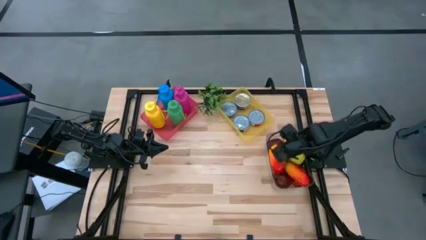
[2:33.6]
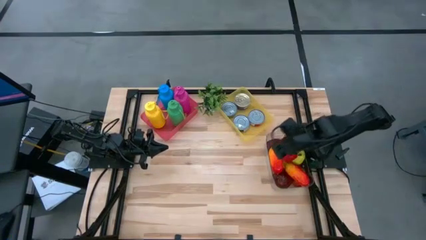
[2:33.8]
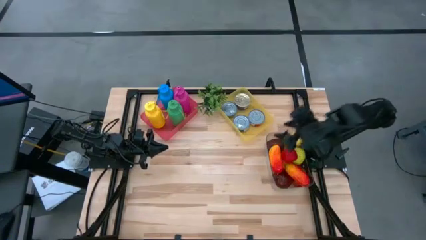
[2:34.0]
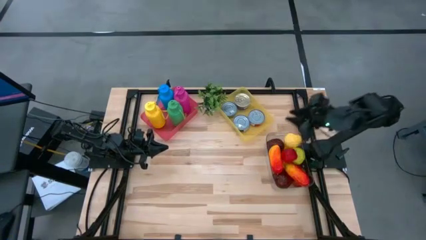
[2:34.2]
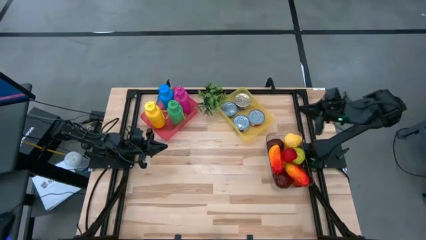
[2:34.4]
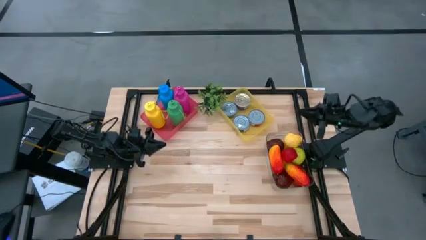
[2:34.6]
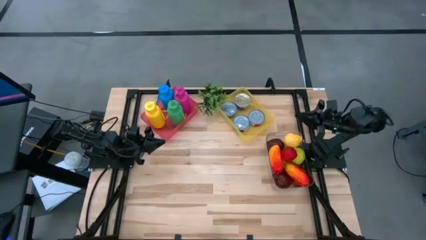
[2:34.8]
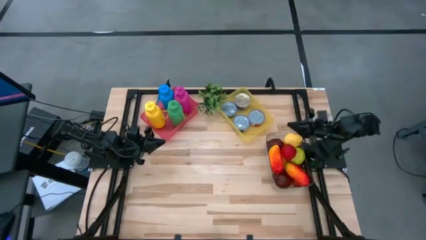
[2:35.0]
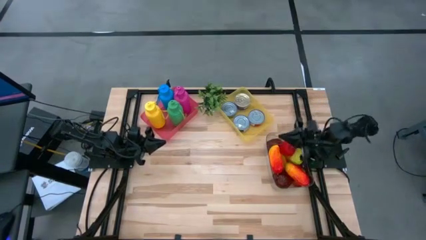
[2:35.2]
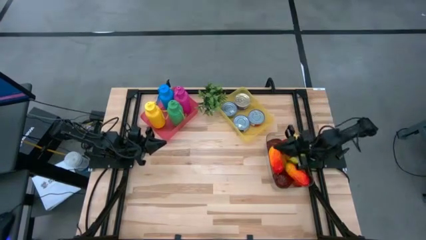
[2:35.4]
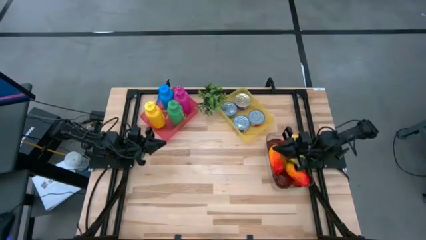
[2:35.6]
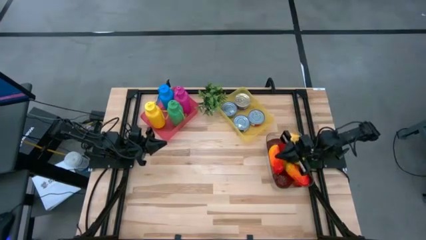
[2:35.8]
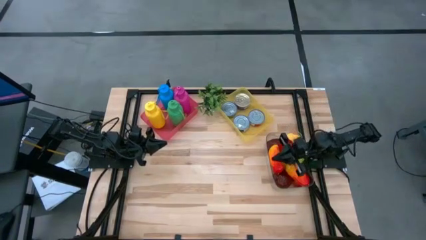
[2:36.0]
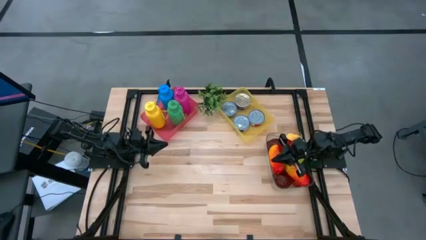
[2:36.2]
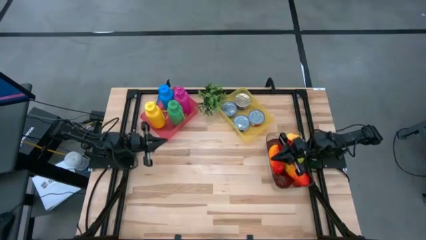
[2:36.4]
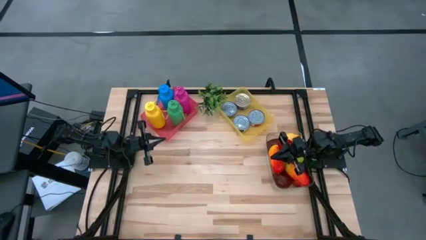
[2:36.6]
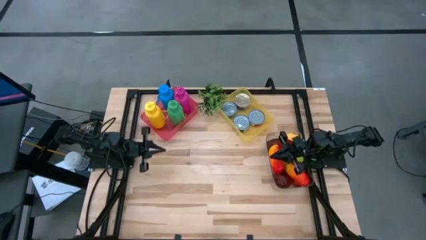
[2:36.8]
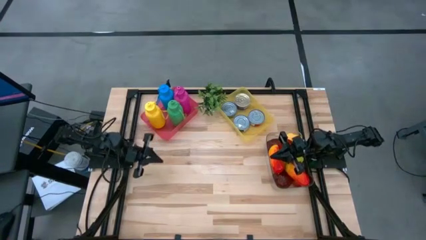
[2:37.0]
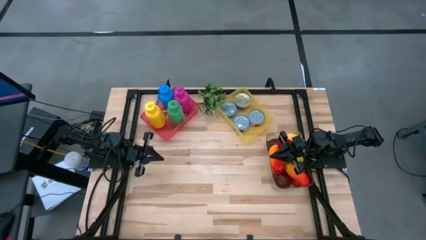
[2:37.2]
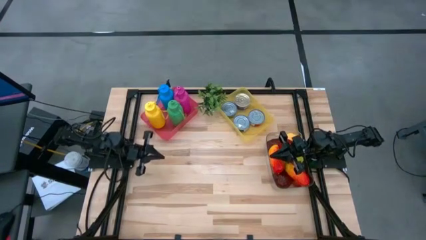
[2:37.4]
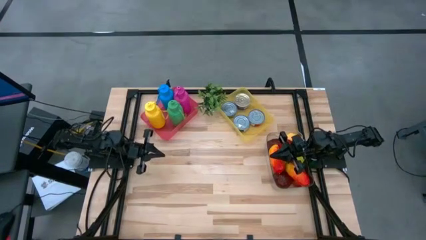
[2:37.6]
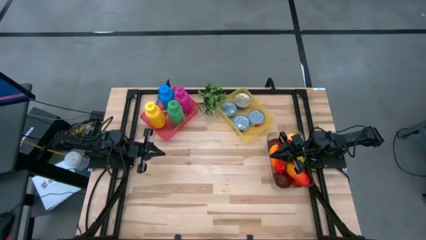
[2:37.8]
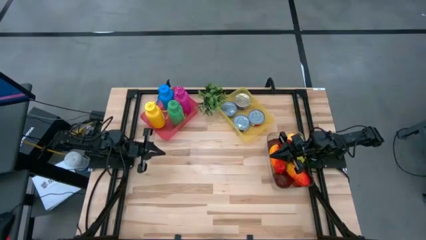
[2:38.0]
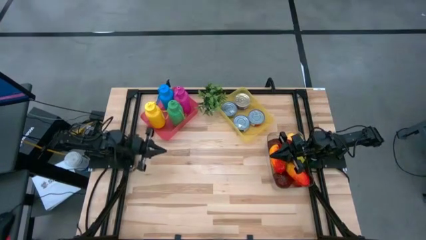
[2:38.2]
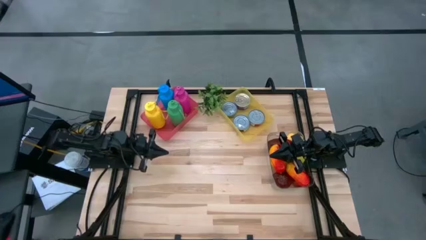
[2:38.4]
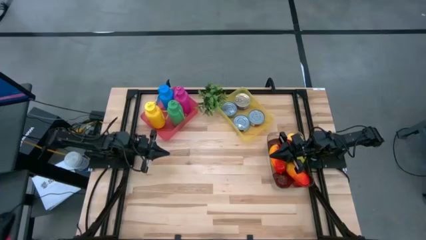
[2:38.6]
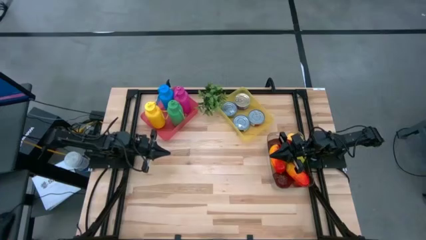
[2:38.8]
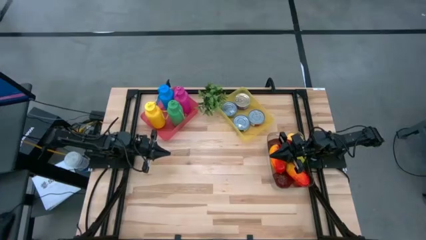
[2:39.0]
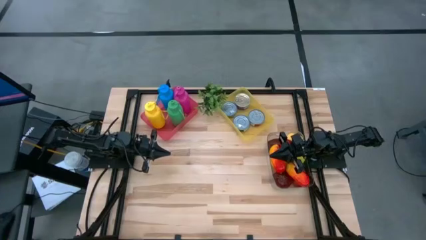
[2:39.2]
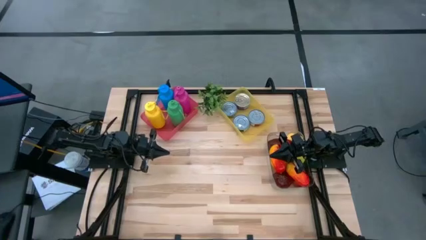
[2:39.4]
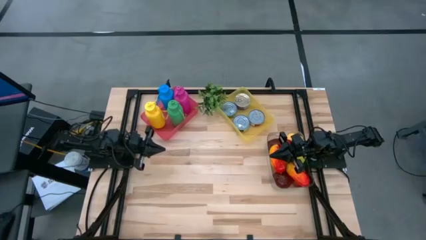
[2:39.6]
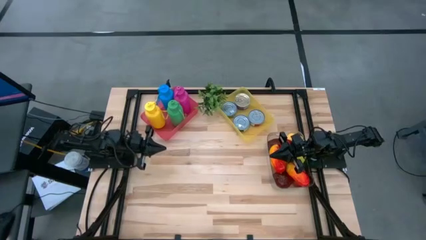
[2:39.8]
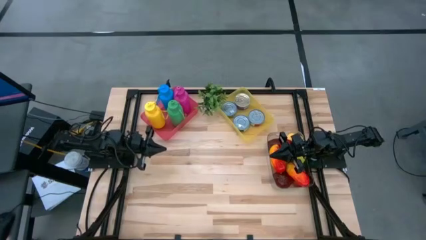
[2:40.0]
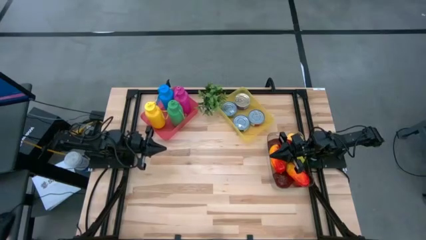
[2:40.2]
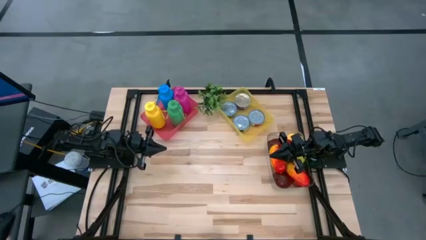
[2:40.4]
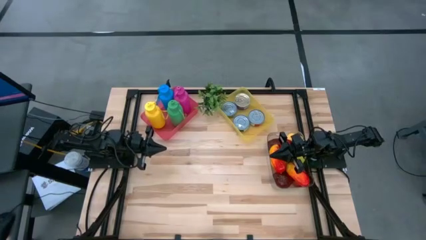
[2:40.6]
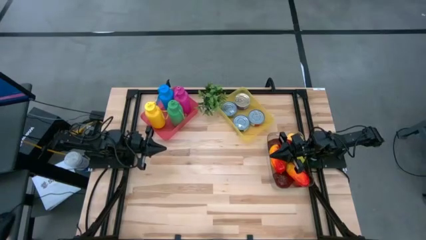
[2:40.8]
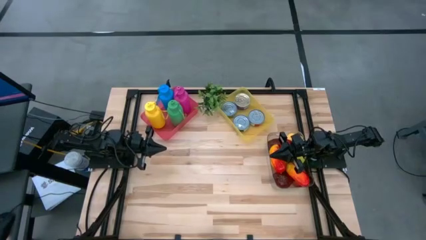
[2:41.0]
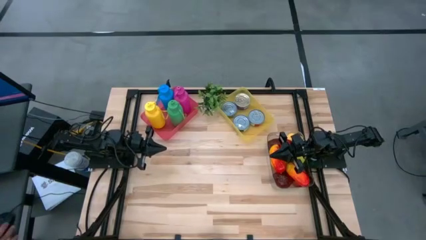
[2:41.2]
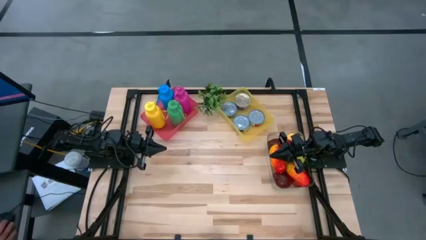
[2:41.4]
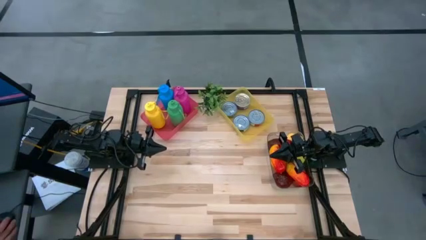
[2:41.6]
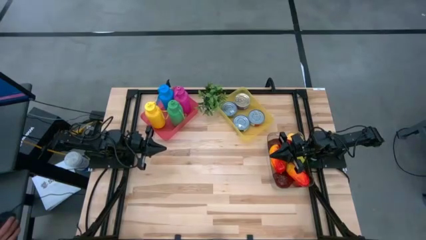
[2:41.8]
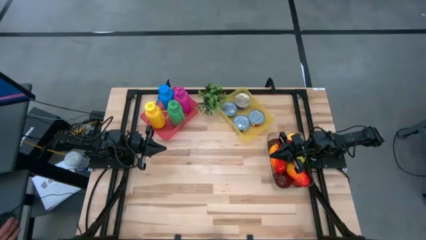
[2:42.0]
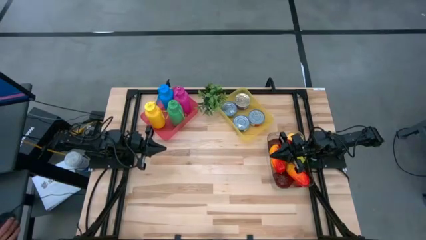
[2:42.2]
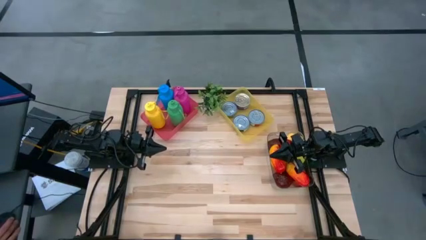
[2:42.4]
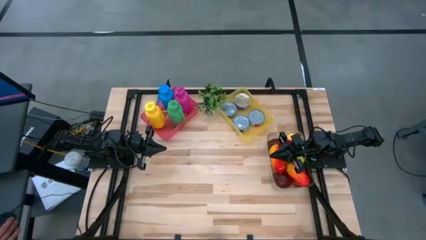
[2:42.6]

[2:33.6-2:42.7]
Task: Pick & Place Food Item
Return to Home Position

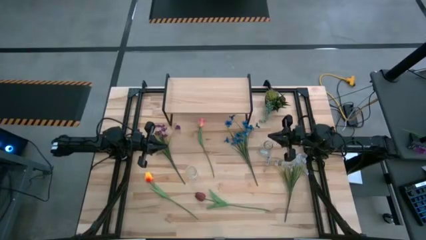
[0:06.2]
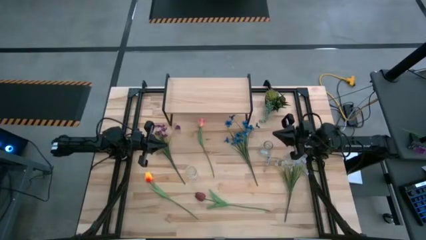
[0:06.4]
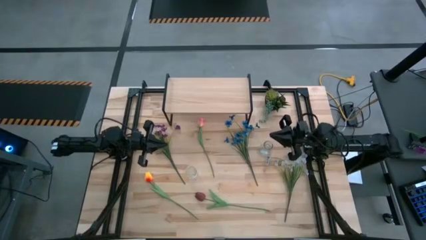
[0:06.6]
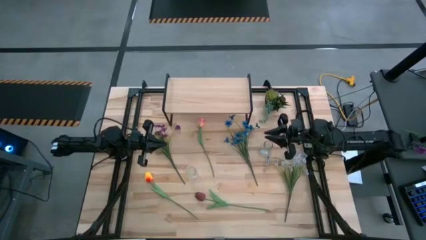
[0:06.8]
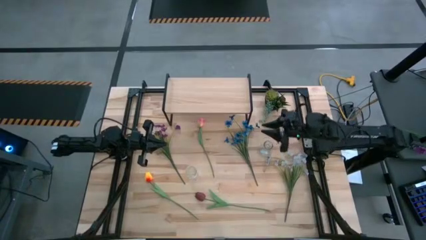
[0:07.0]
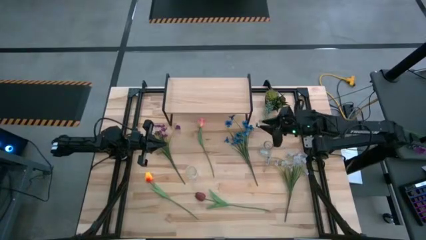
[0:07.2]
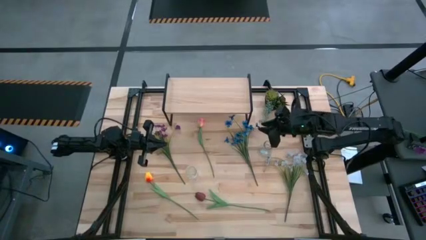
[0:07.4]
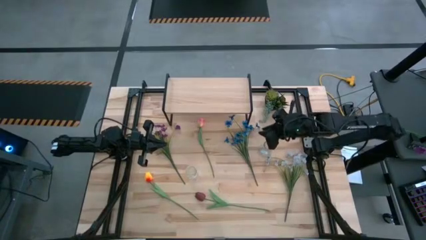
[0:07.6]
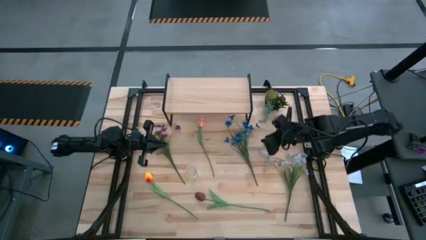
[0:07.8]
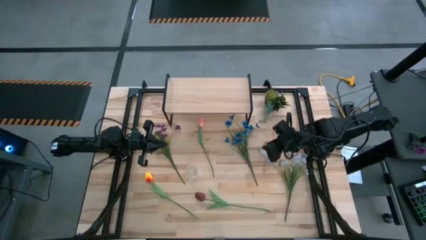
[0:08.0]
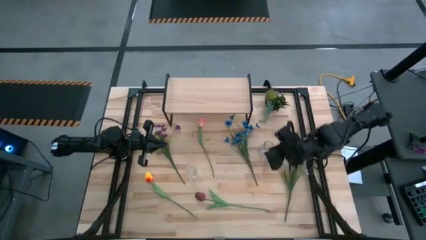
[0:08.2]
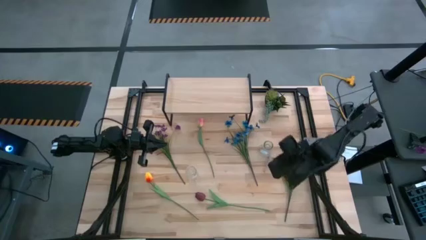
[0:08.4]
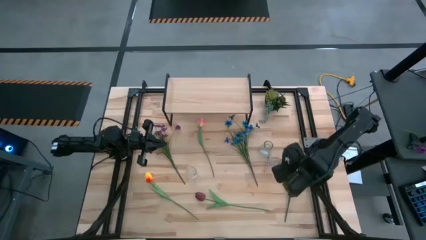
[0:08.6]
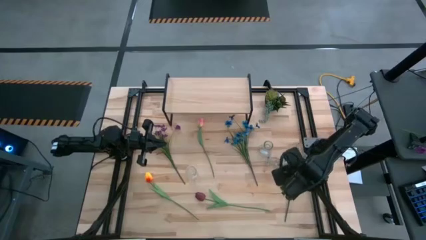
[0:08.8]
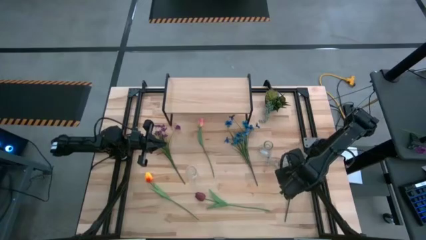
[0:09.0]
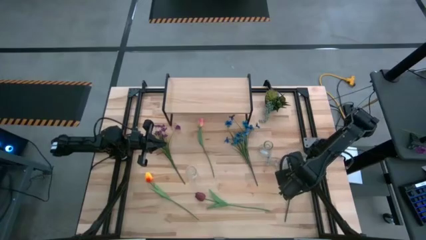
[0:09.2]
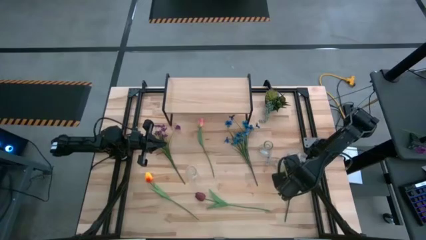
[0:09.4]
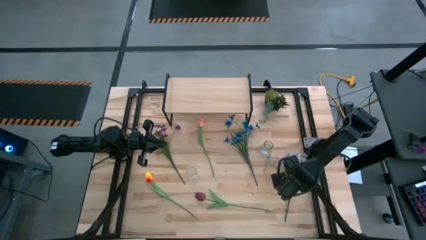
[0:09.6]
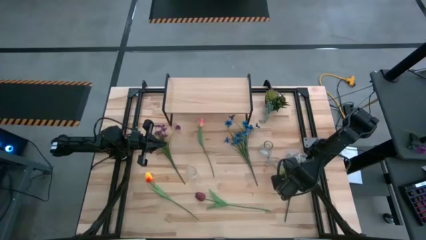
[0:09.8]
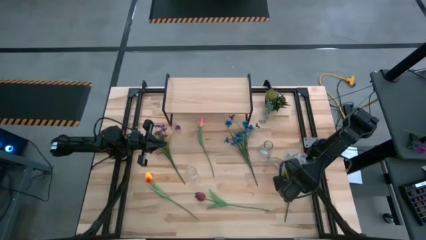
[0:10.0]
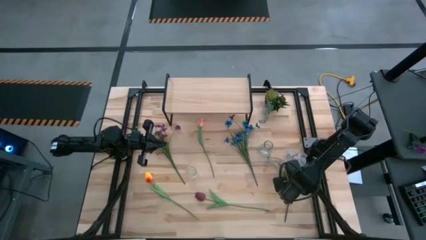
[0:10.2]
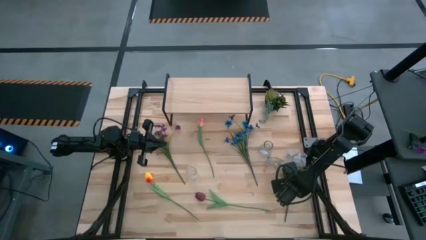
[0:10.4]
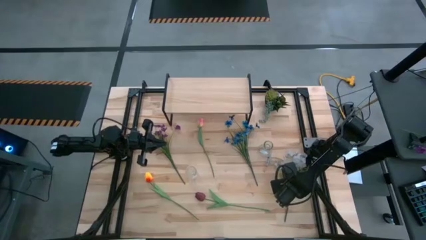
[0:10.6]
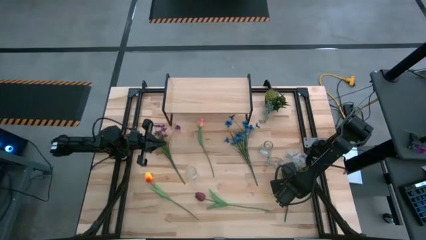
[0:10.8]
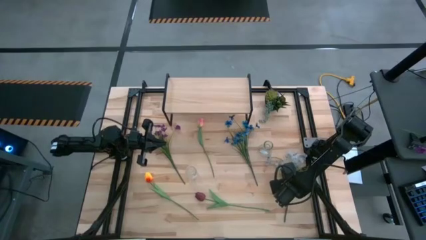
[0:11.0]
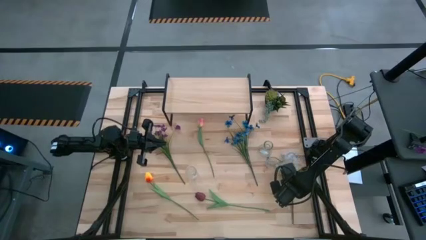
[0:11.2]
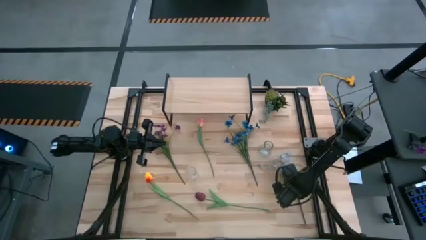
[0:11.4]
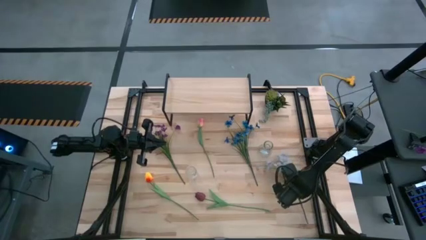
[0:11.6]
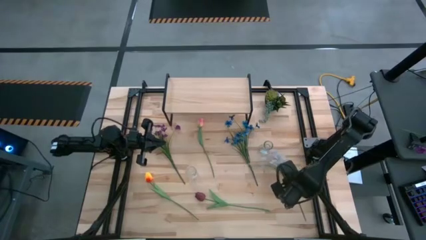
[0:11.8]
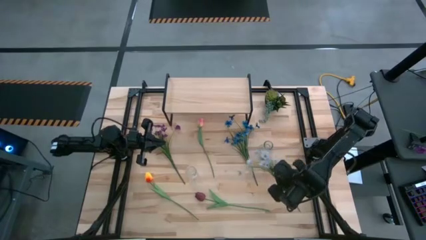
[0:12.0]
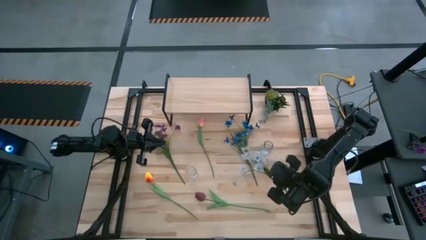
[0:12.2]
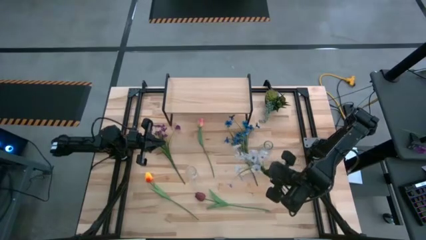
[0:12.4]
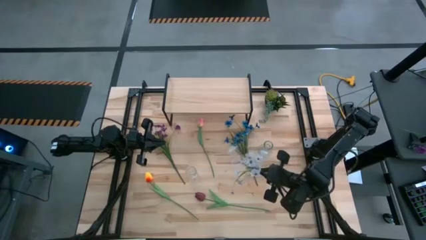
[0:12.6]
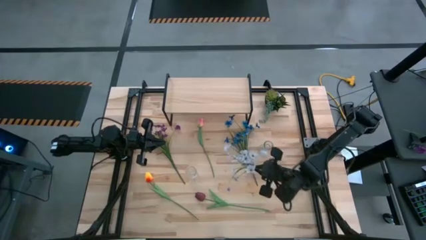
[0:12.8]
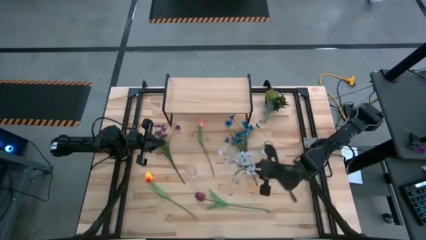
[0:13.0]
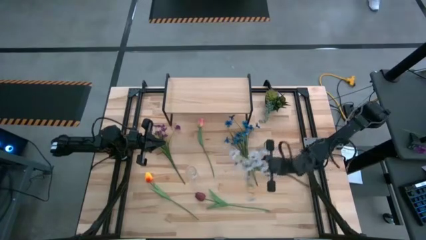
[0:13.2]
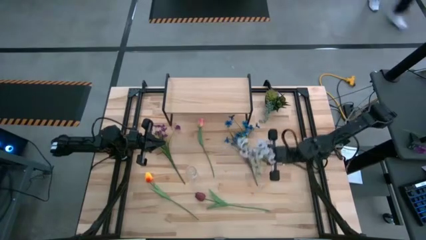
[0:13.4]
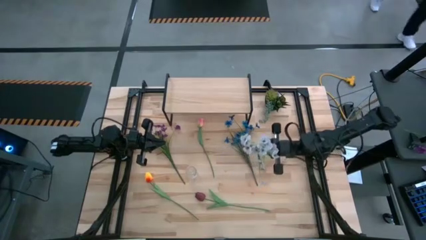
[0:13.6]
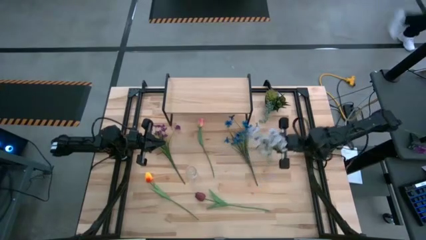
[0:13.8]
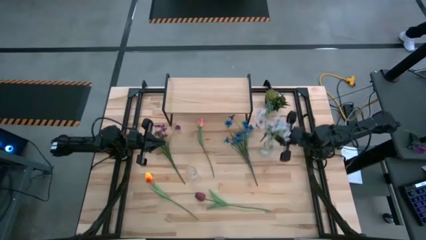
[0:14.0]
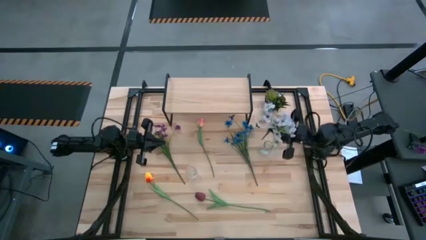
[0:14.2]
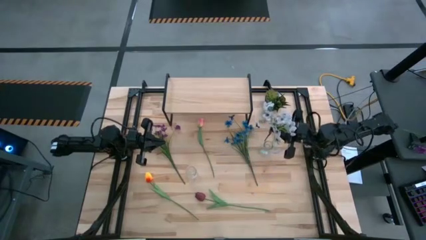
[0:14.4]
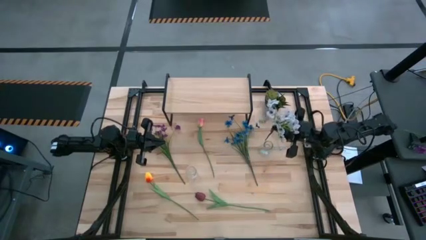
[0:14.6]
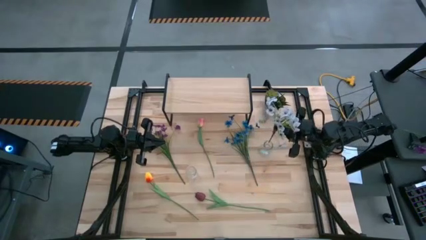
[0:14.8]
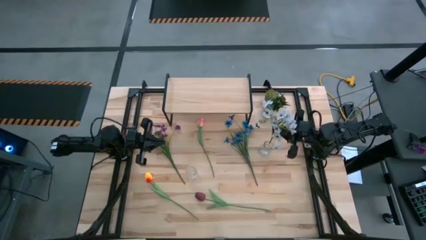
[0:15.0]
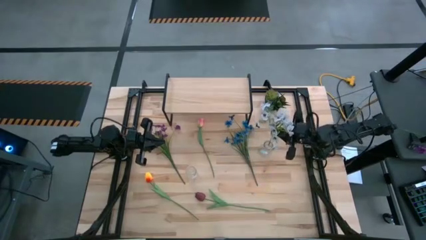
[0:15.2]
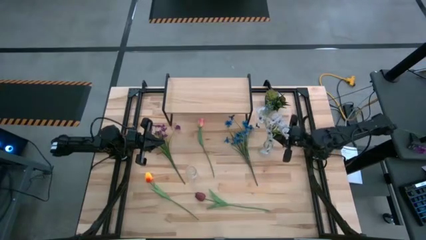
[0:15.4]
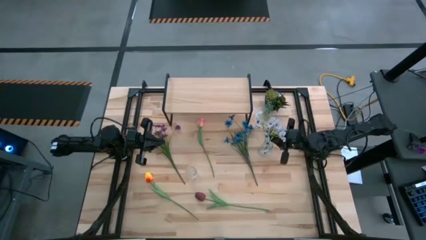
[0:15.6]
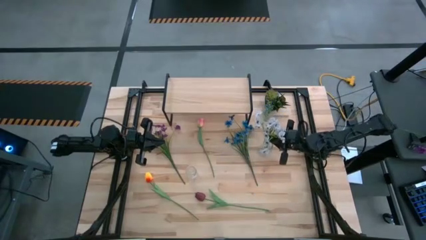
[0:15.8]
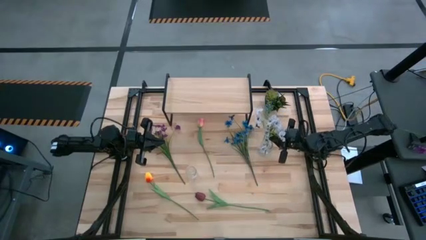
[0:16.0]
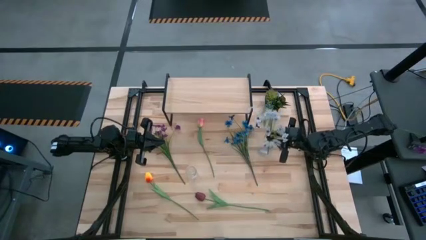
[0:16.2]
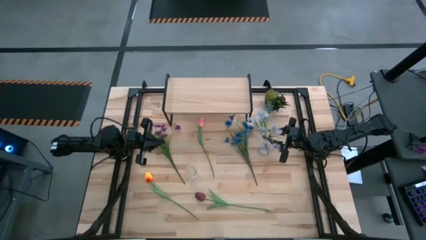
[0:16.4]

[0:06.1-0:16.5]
Task: Pick and place flowers into a vace then onto a shelf
Put the white flowers into the right crystal vase
